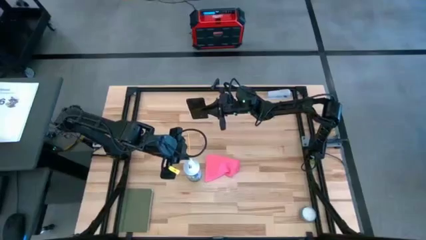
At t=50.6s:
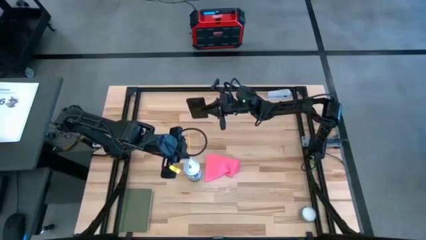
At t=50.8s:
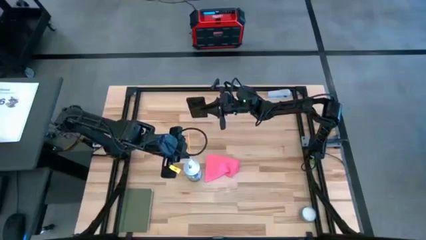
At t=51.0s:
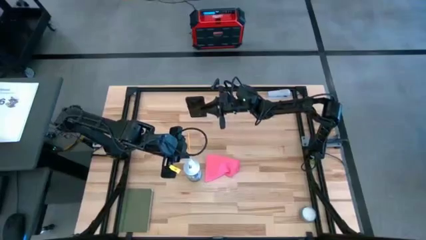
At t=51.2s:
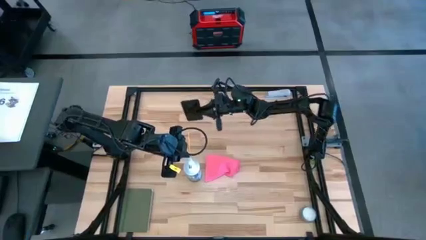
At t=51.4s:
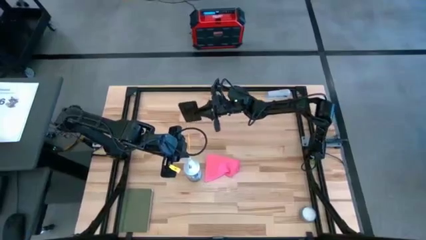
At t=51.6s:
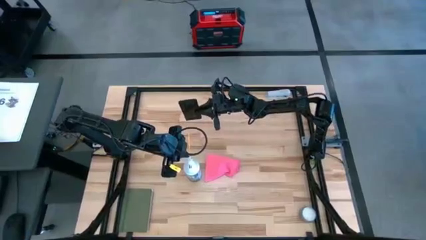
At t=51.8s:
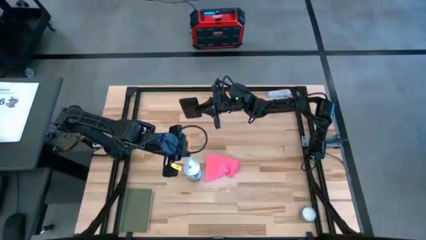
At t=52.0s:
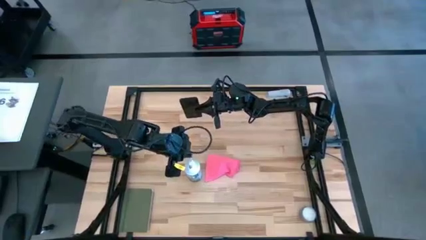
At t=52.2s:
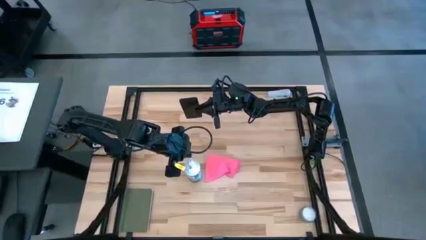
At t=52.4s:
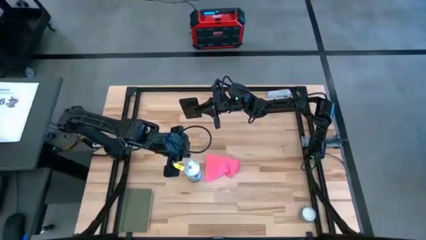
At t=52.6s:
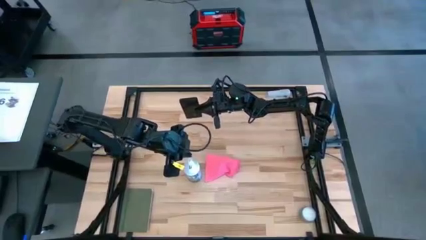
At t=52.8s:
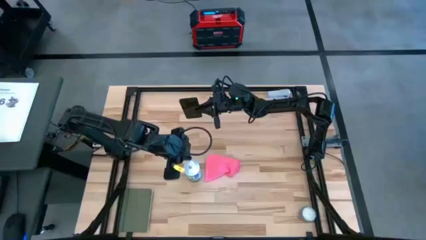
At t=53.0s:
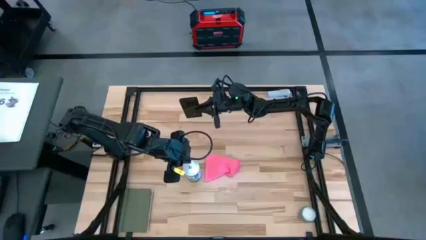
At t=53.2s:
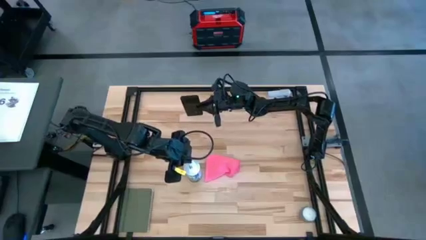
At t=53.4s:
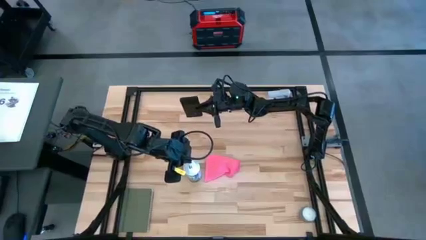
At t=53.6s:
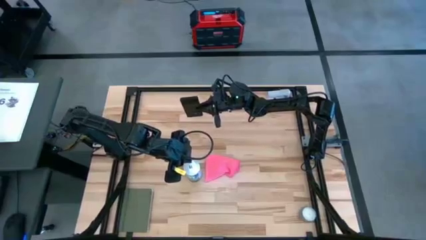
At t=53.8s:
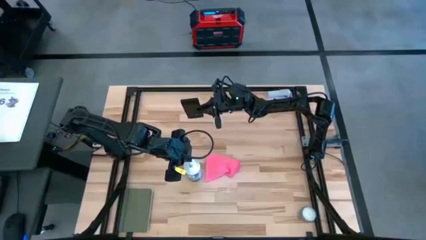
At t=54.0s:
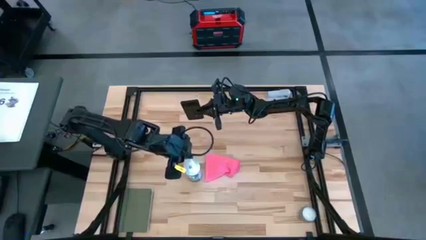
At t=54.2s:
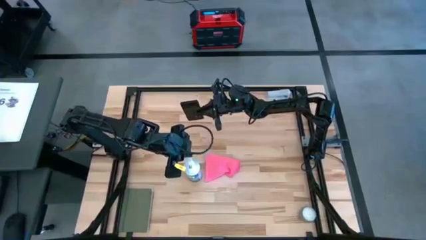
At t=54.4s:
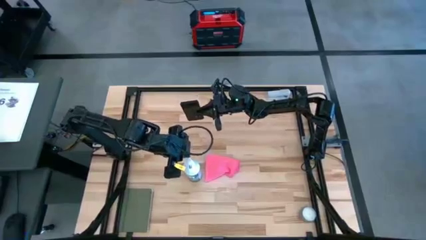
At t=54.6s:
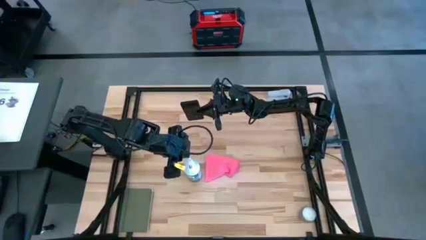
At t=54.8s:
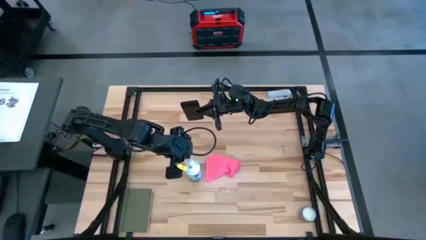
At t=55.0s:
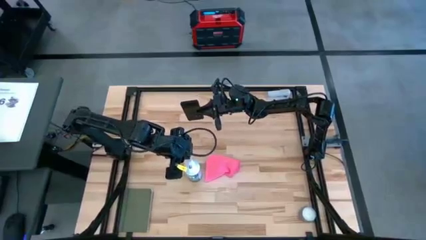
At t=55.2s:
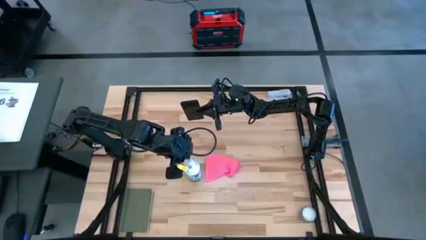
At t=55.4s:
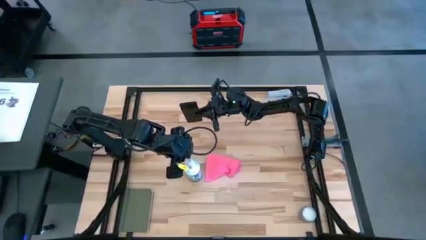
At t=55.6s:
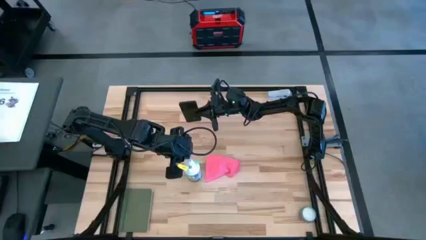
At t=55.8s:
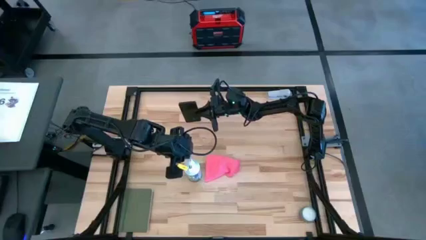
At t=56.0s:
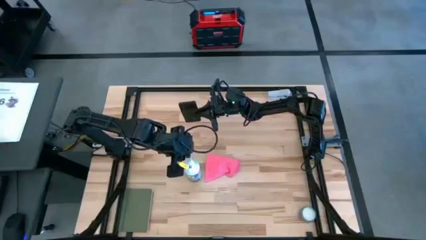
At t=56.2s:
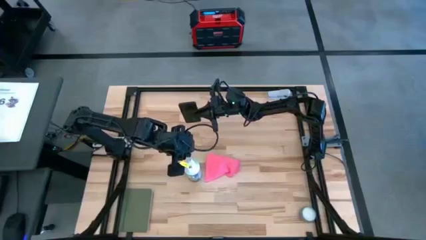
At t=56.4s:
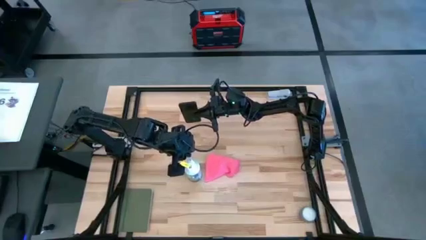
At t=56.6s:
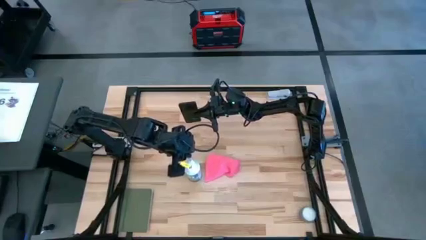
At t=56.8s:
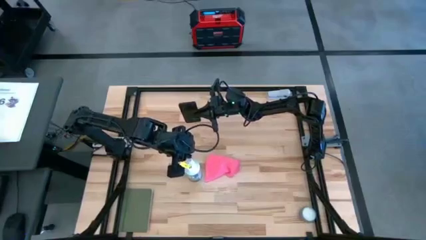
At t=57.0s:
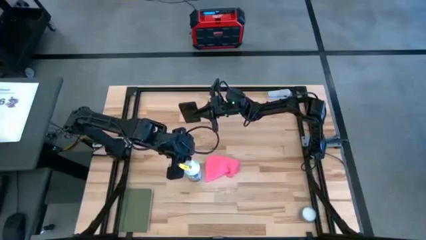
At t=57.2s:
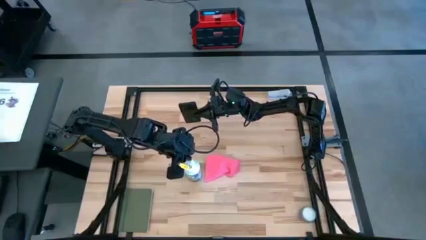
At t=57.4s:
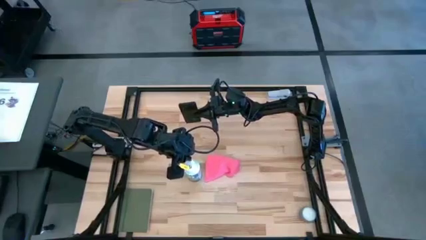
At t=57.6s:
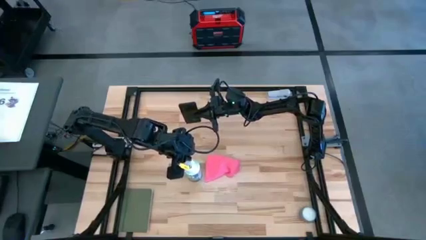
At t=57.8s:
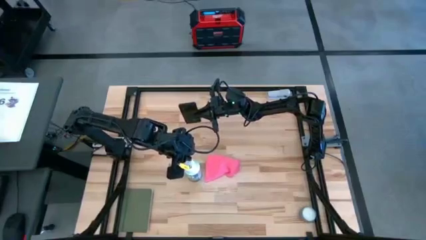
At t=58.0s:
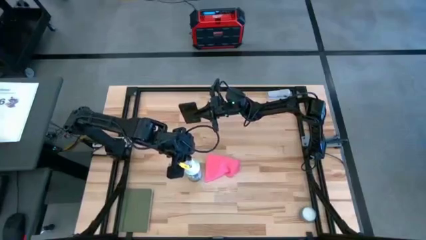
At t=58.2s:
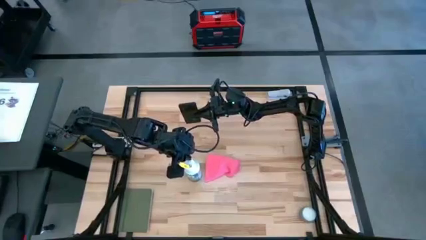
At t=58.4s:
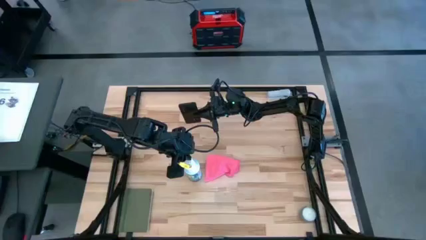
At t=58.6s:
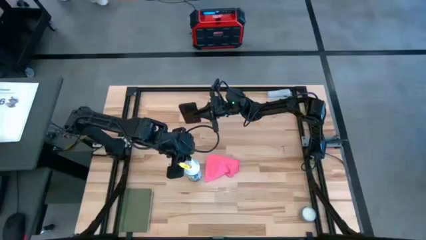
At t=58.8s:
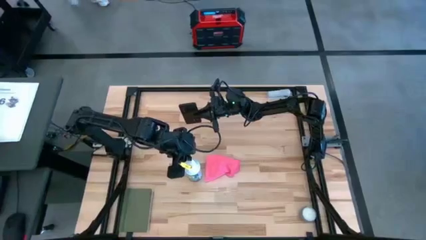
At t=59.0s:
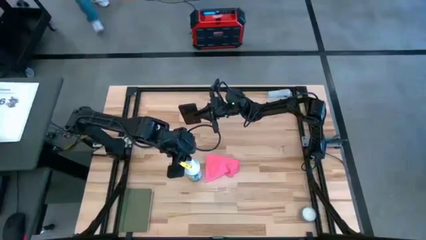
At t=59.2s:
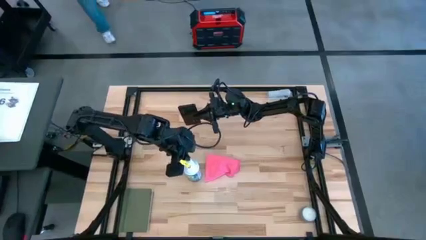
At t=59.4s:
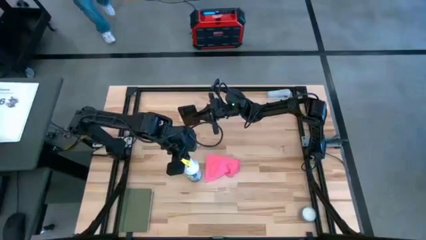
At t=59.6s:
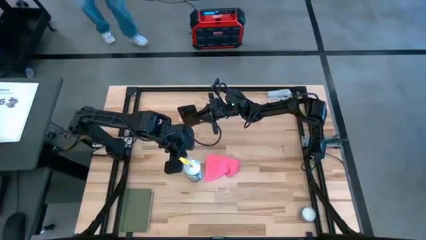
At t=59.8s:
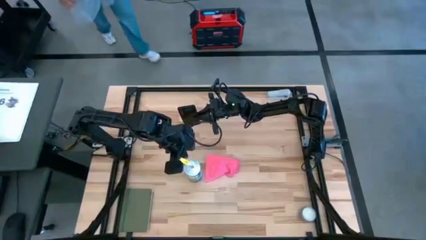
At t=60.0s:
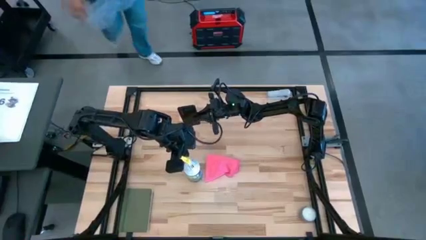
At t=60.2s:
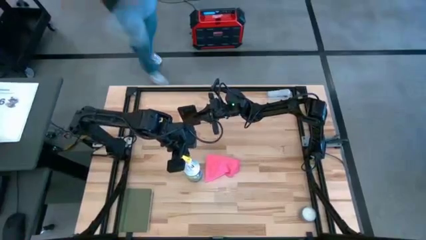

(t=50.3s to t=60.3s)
Task: Apply microfiber cloth
Spray the back of the cellphone with the white spray bottle

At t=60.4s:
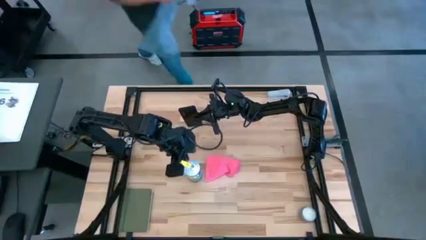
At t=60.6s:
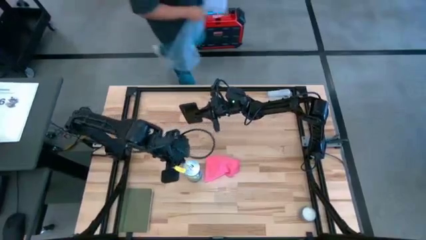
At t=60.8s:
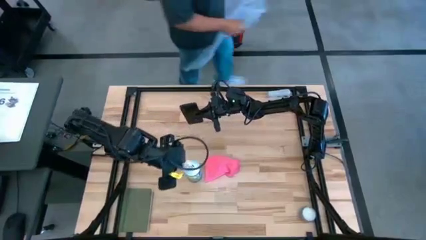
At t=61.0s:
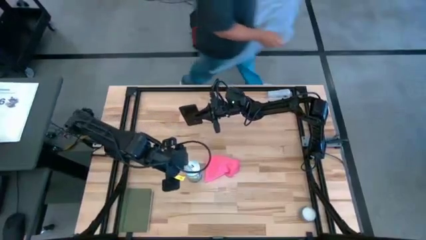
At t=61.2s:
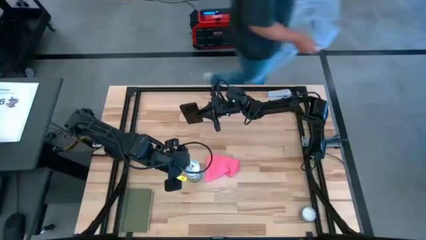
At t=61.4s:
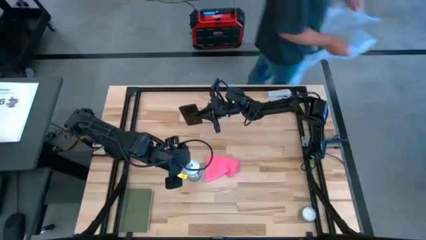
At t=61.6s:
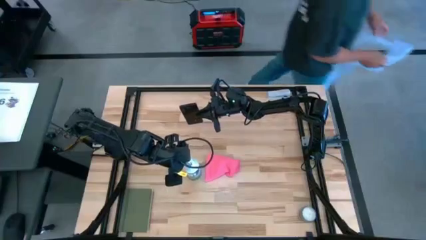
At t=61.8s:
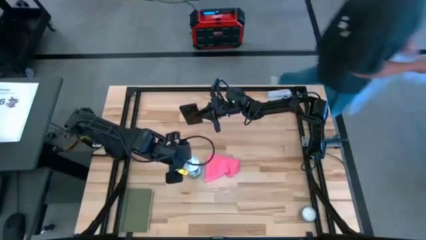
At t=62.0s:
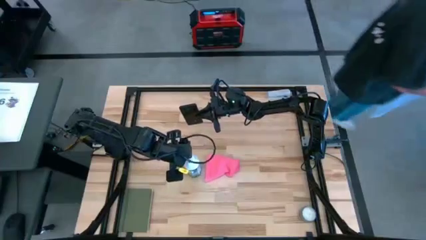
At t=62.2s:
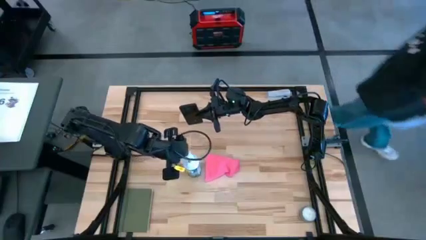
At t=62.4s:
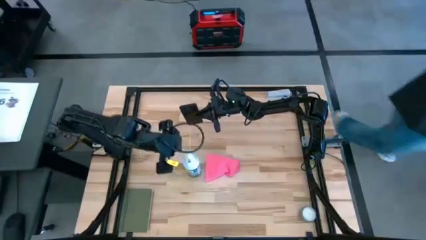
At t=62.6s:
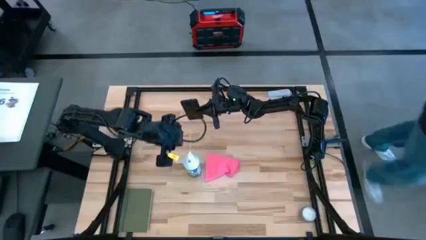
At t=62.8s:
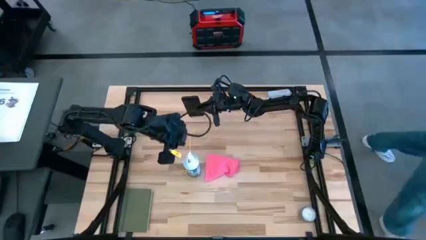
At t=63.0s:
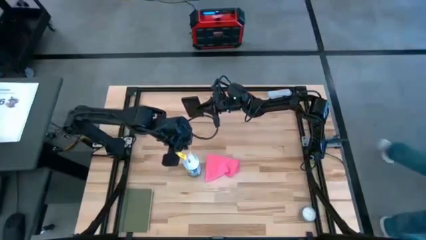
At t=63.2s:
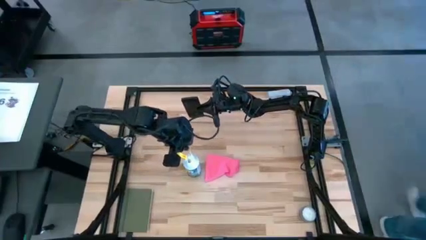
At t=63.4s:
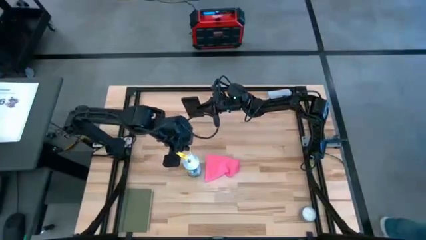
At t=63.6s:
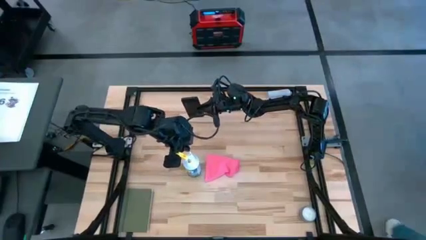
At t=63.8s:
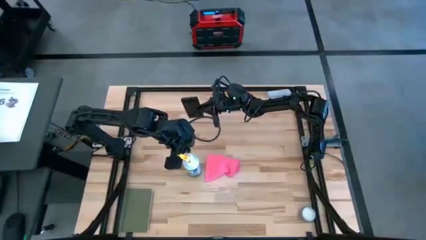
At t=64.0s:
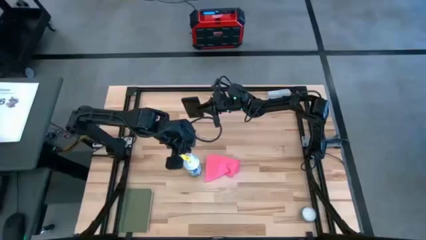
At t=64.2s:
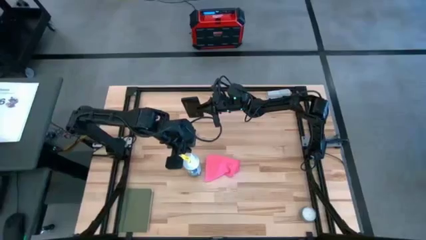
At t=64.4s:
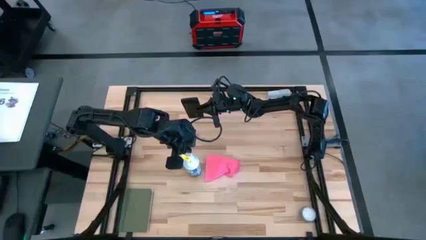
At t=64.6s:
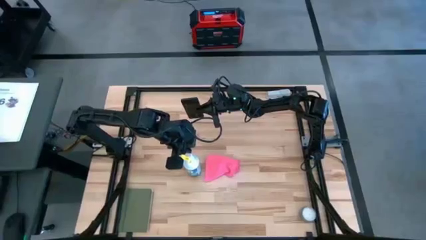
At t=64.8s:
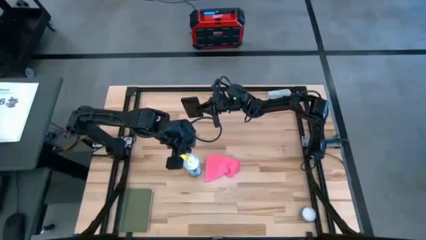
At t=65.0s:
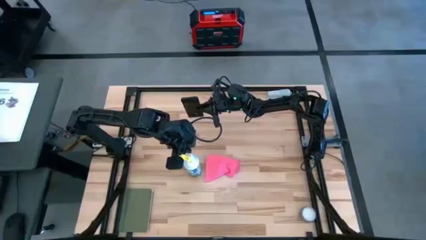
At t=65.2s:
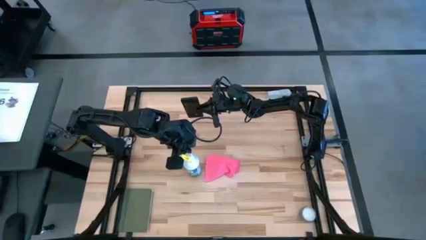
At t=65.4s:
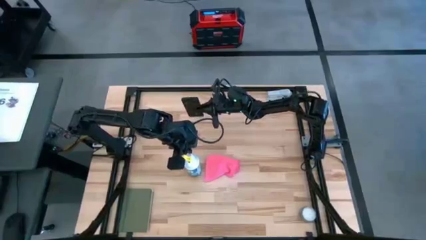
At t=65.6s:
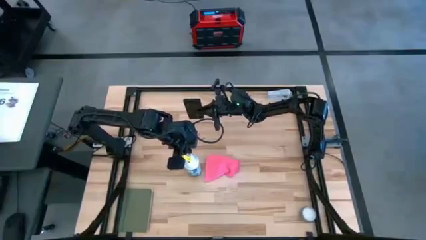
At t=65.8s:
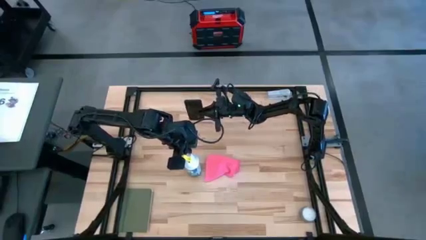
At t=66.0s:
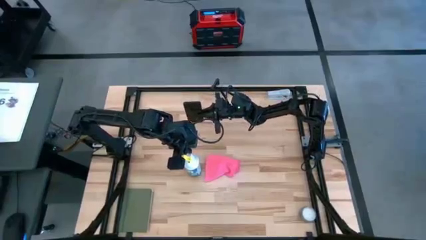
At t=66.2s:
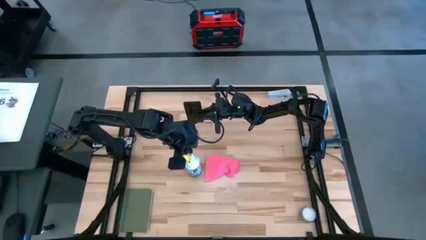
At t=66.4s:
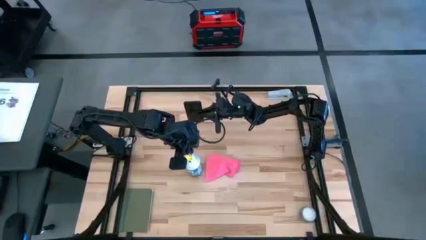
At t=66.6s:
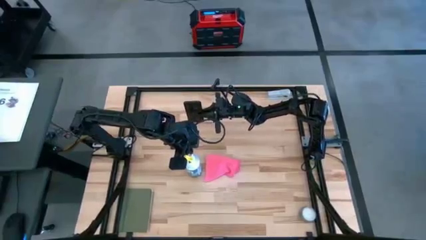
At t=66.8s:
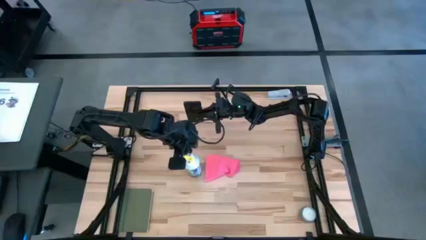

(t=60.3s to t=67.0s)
Spray the back of the cellphone with the white spray bottle
